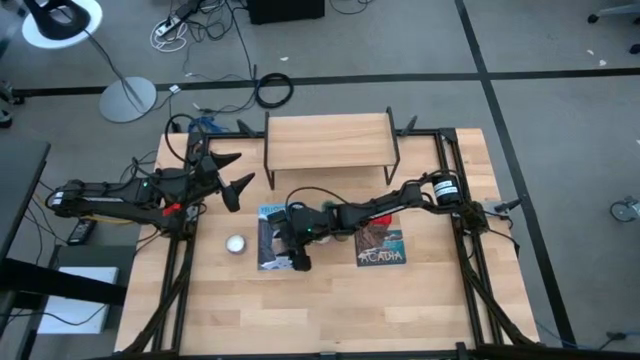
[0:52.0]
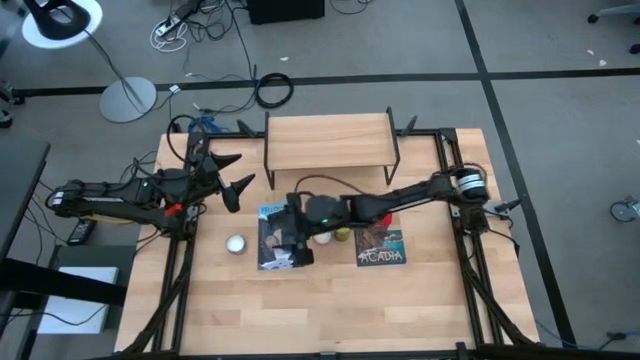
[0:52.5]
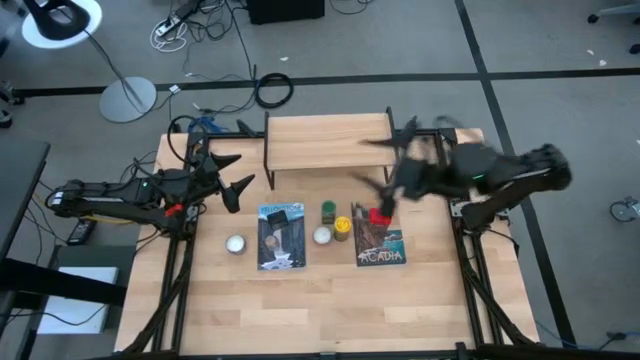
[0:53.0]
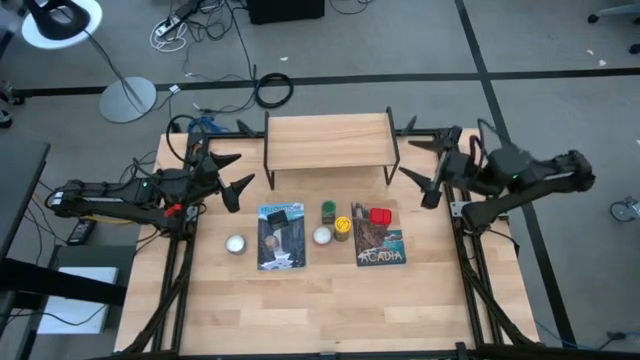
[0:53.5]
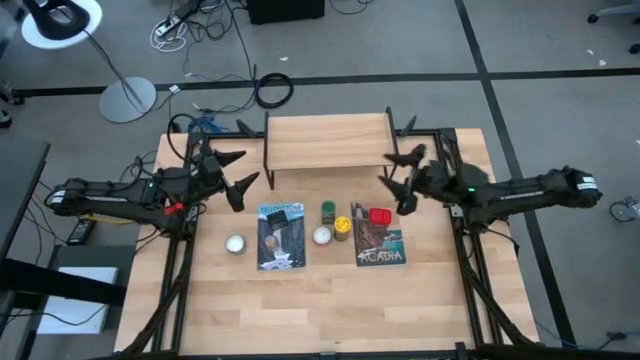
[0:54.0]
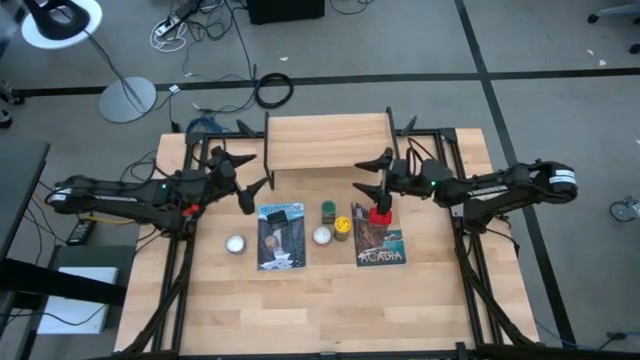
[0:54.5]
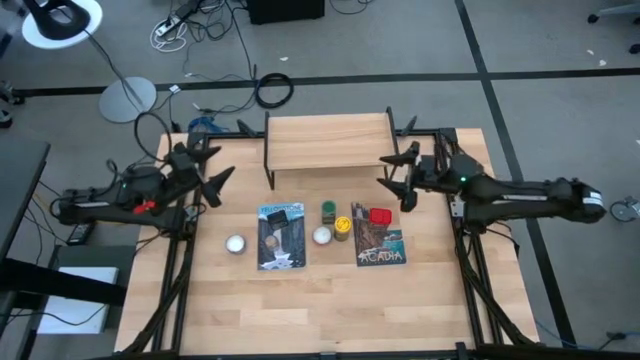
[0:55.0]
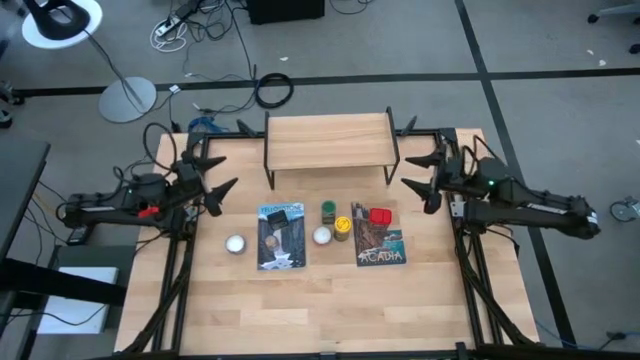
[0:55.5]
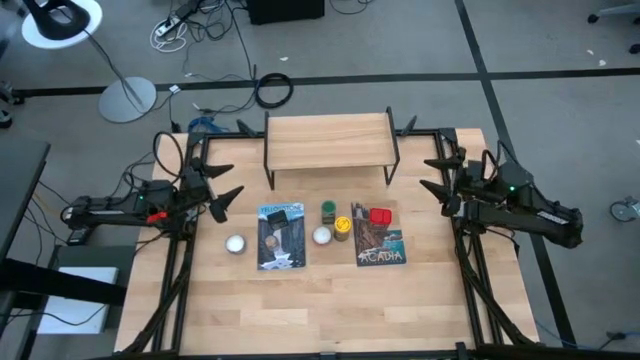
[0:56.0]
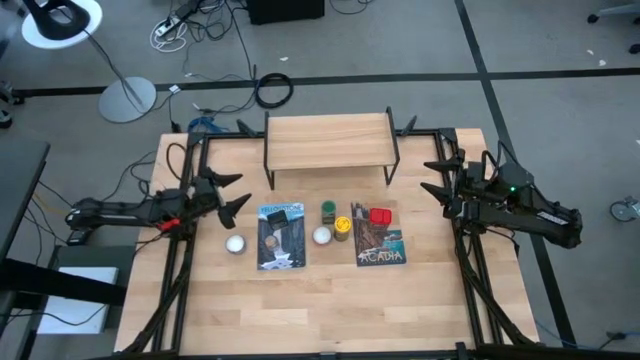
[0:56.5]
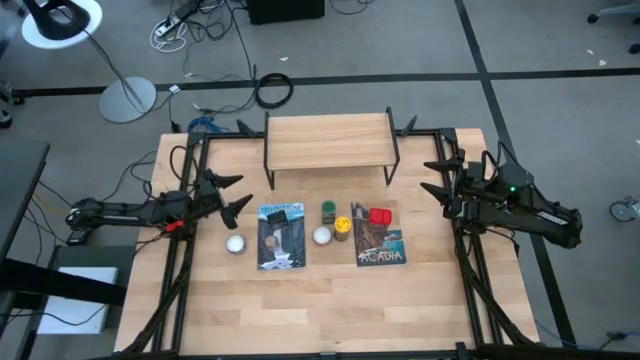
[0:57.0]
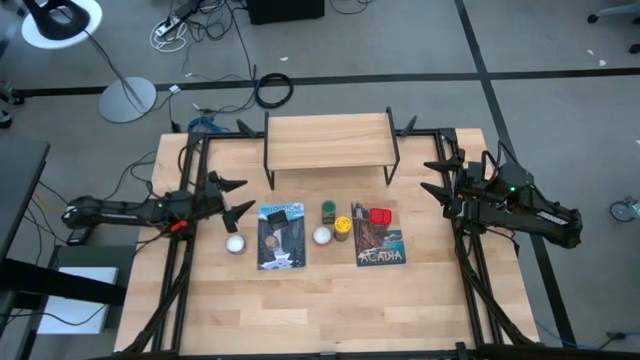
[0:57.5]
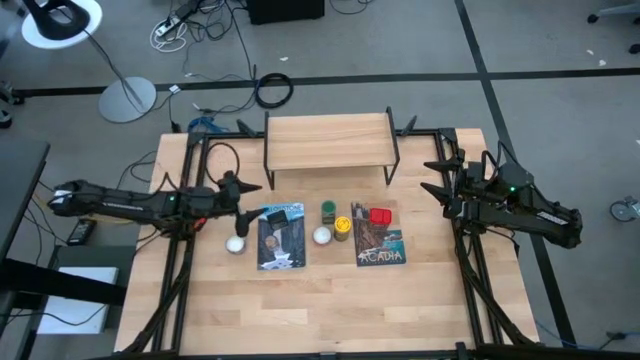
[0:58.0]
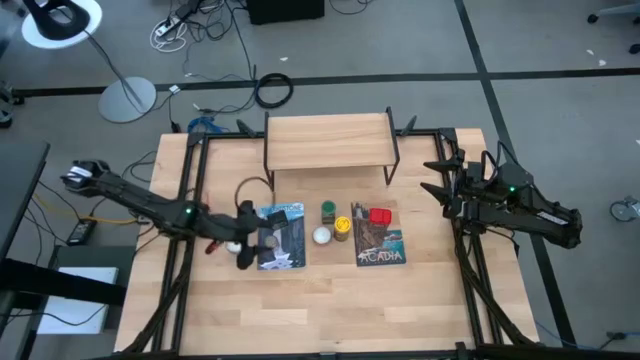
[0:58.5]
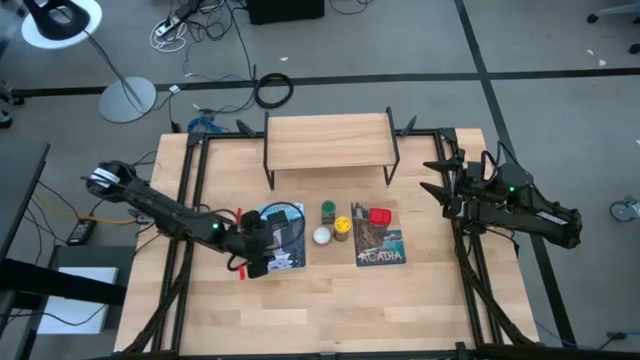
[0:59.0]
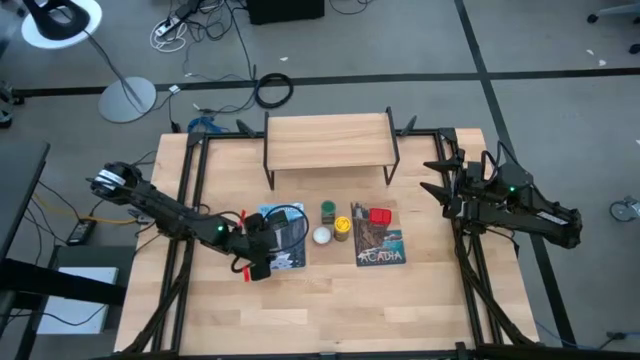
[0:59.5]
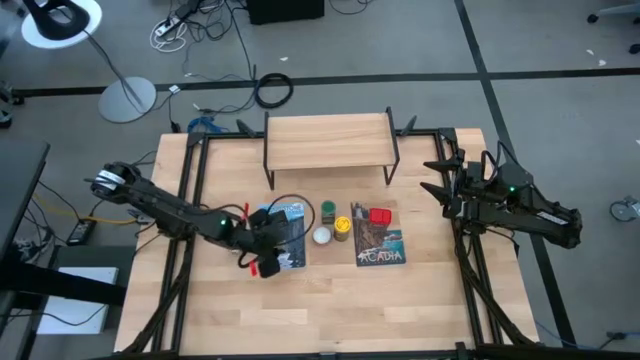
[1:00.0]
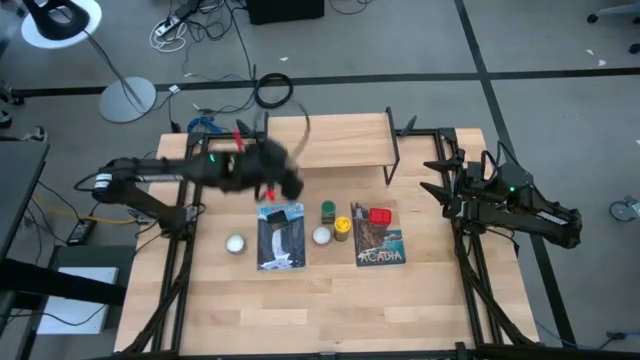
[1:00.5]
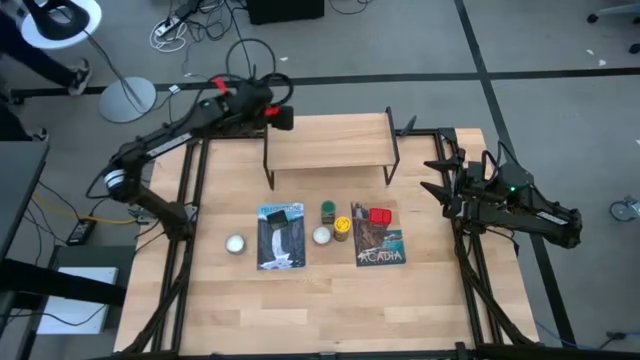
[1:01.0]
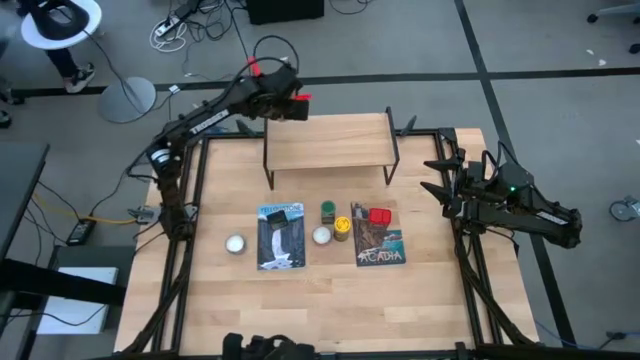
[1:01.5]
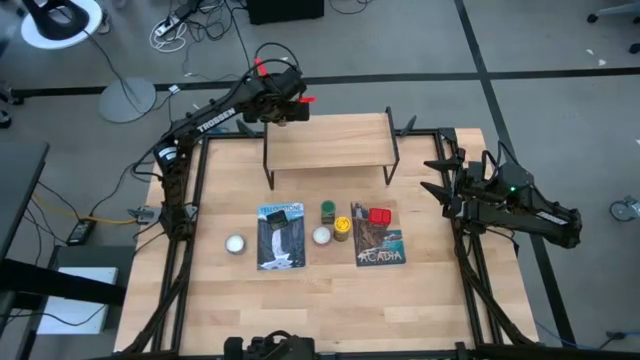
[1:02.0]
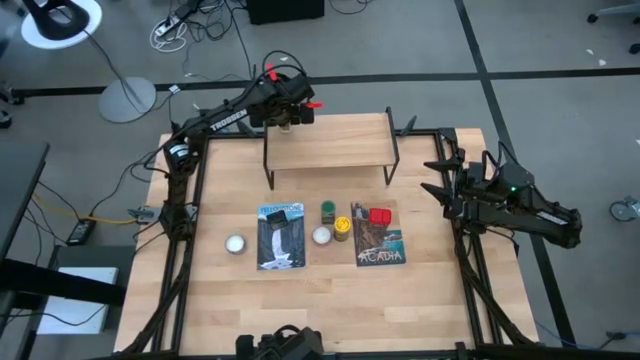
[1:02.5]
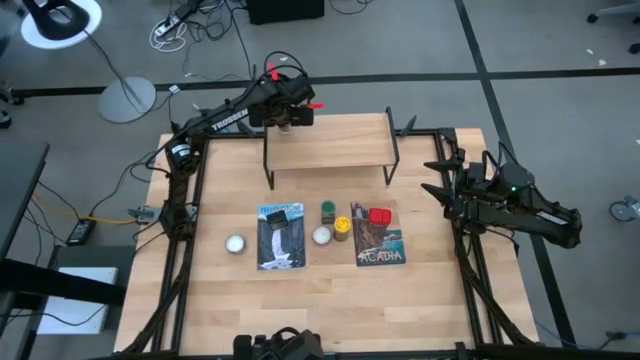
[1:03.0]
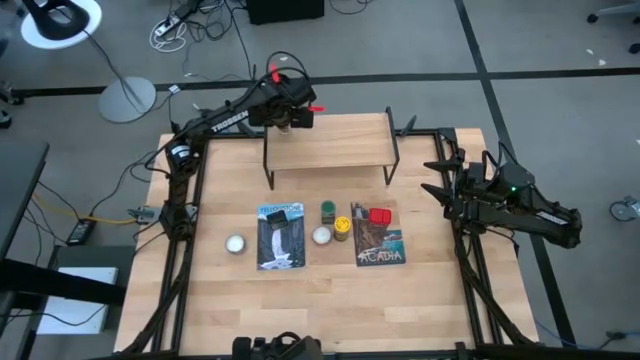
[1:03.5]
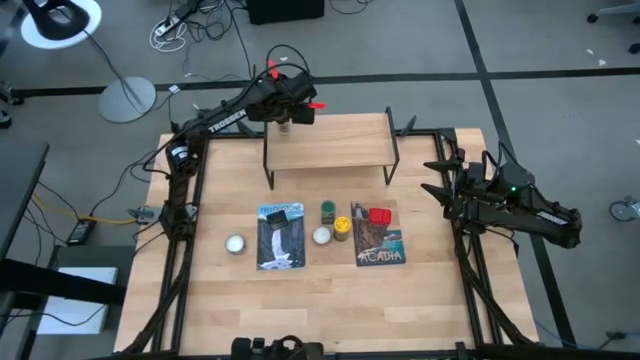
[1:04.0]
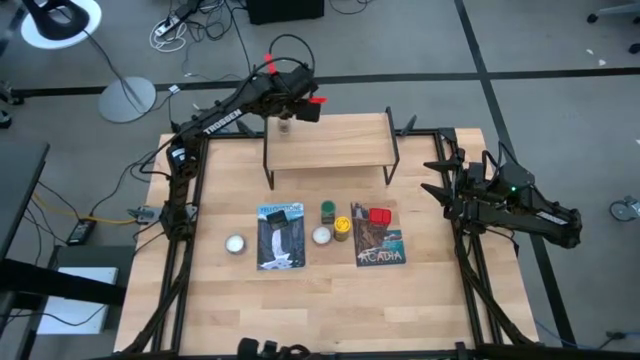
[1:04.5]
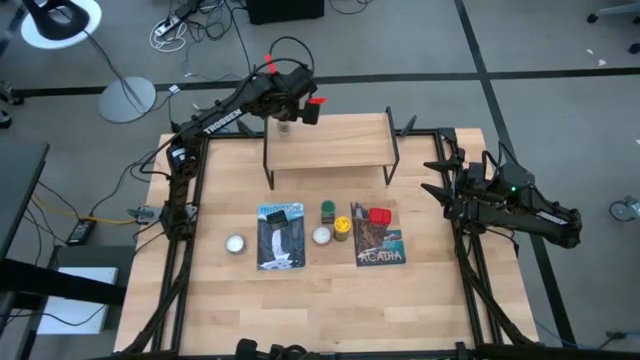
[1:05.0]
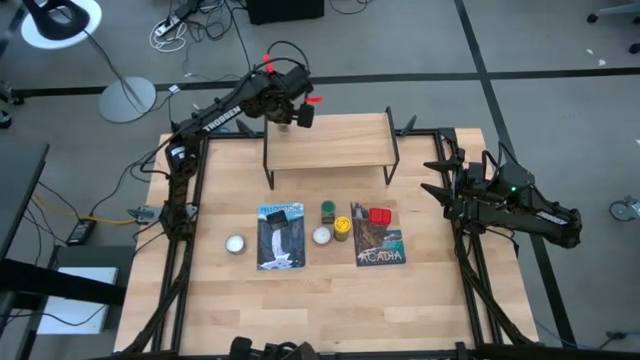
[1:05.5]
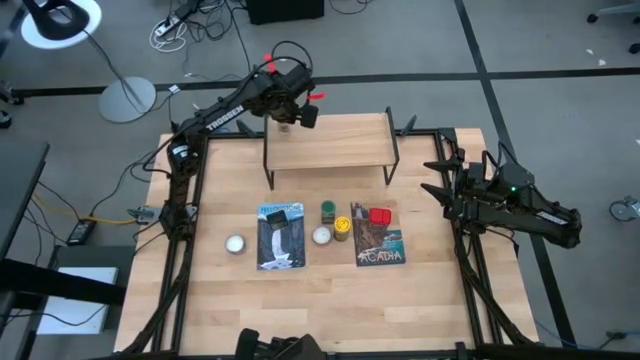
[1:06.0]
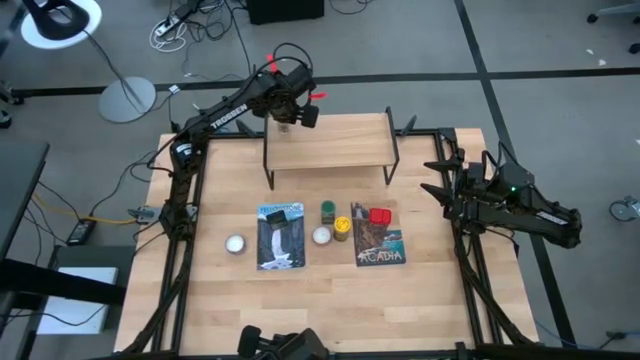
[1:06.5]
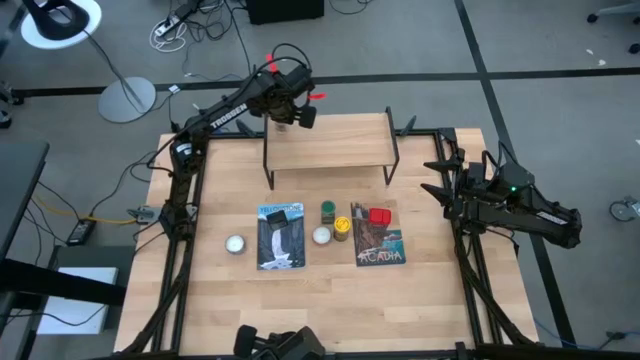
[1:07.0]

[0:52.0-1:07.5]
Task: Shelf spices
Put the transparent spice on the shelf

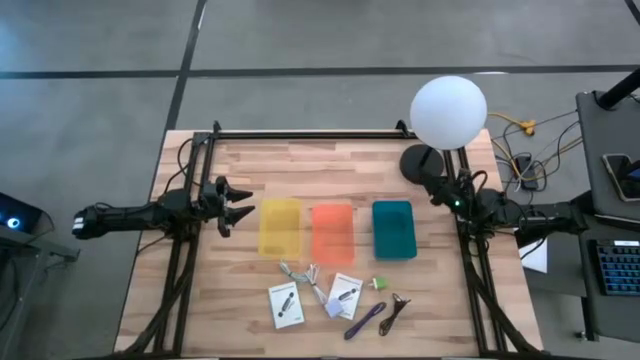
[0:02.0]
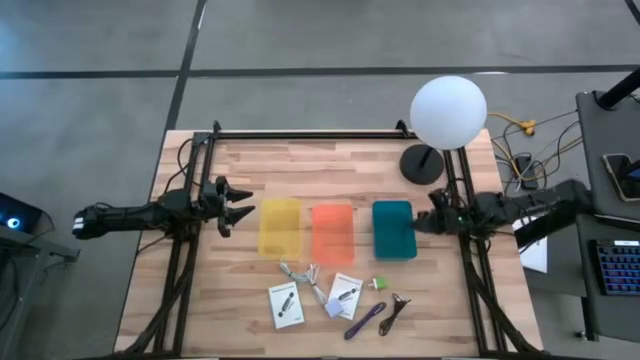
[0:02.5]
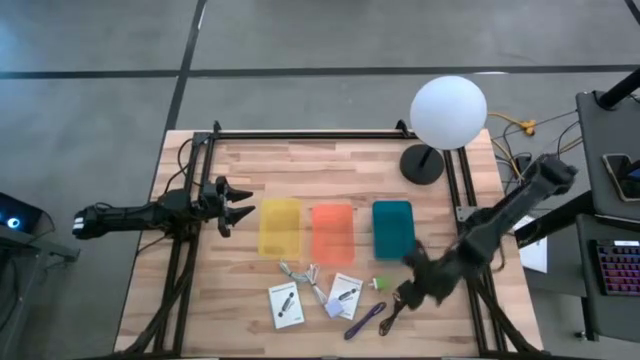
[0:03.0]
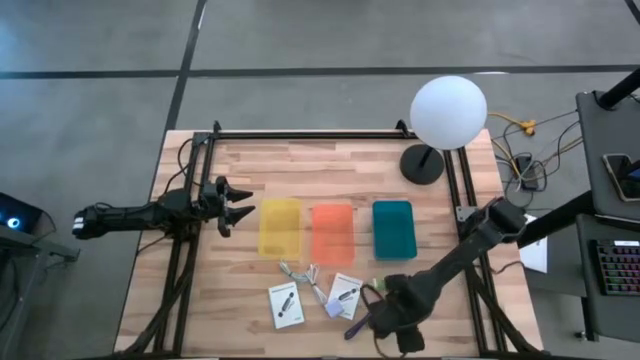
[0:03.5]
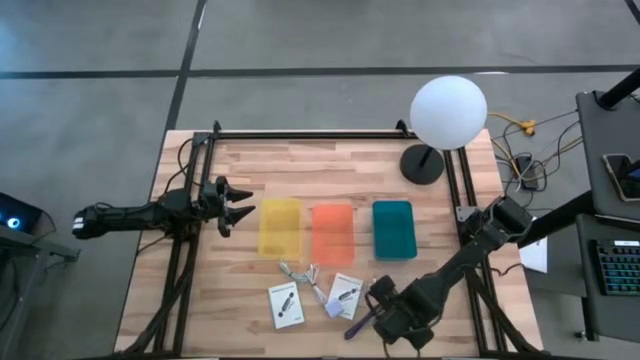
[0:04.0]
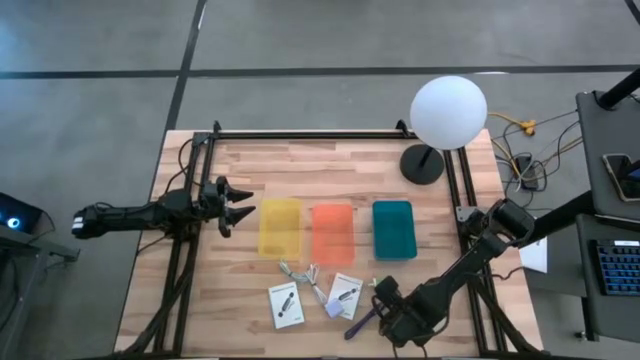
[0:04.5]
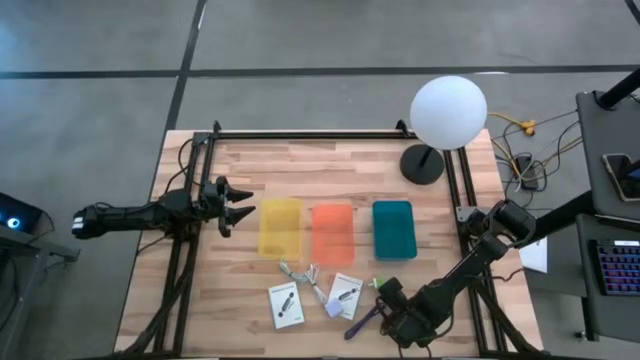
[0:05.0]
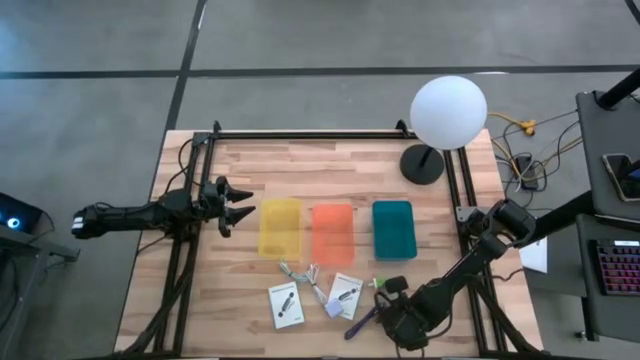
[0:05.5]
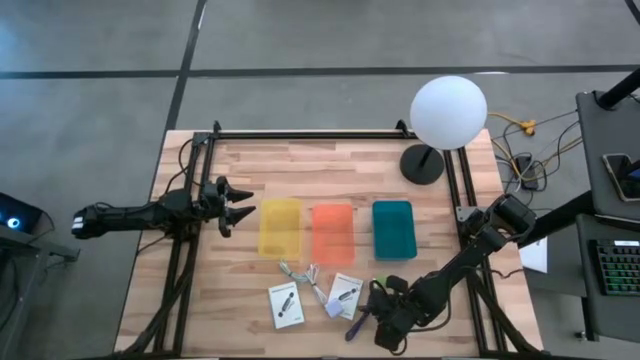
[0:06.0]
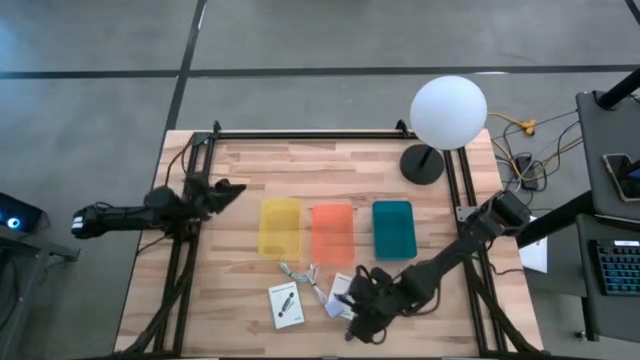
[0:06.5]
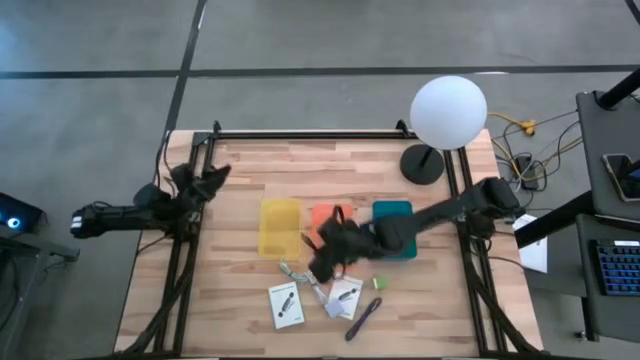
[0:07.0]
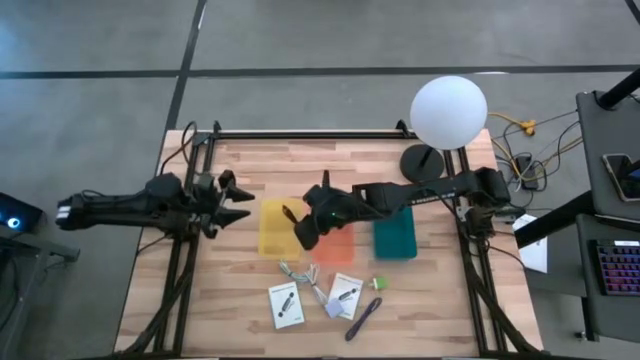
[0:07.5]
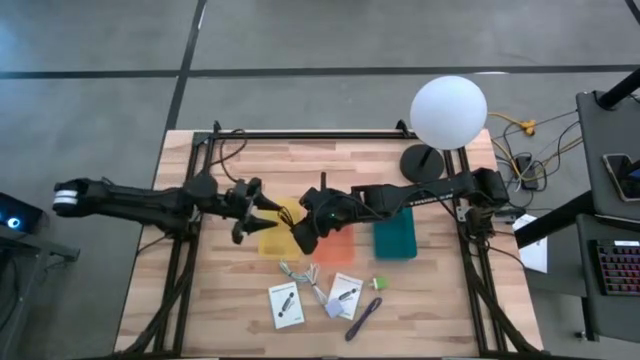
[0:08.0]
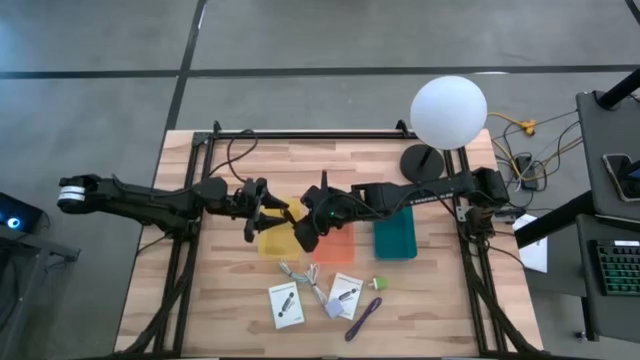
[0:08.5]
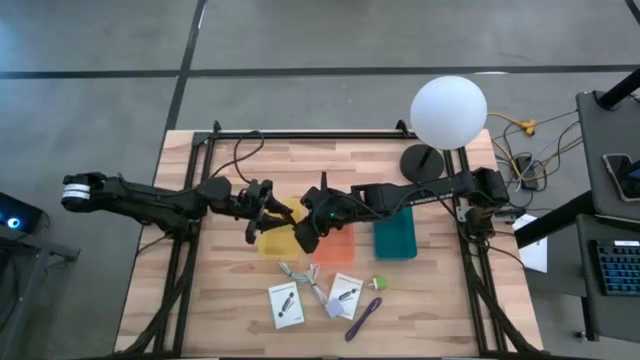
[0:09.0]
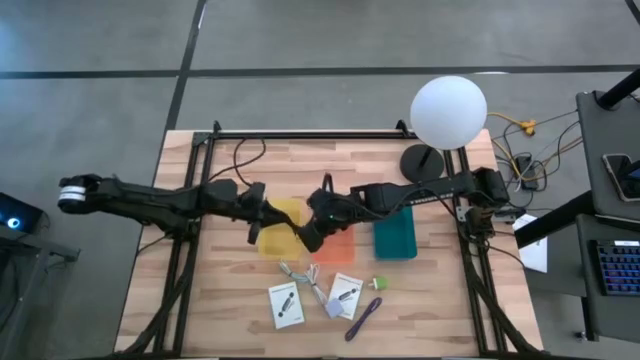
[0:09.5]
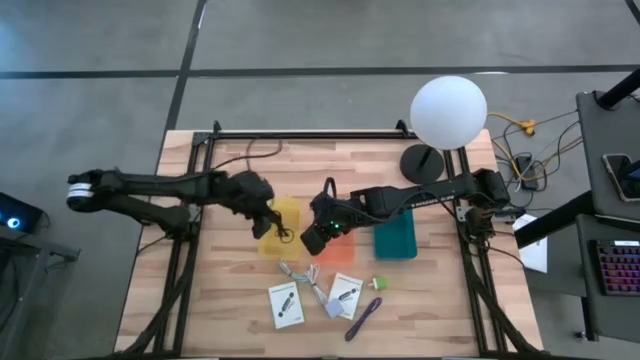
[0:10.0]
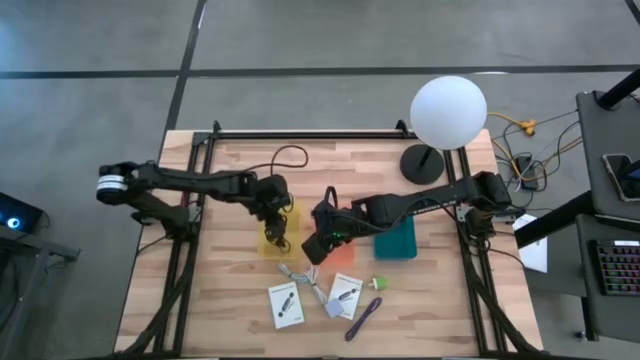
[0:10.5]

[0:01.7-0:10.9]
Task: Pick and place items into bin
Put the black USB cable into the yellow bin
